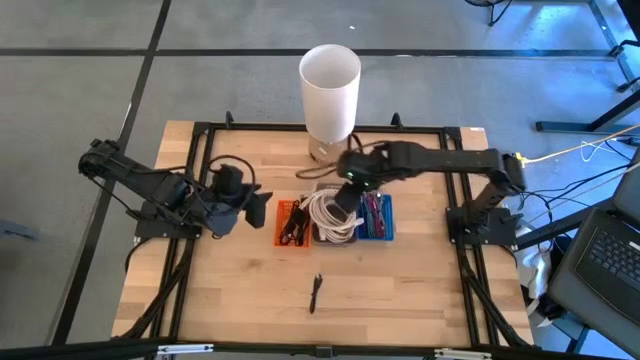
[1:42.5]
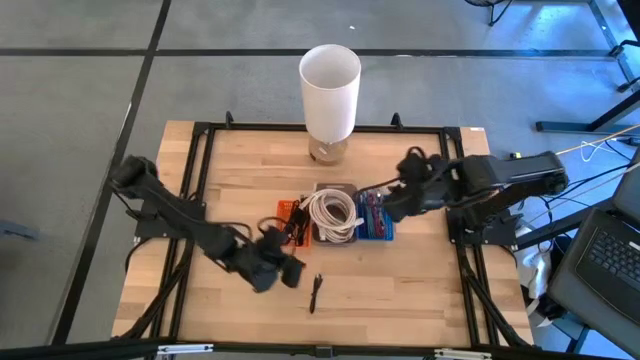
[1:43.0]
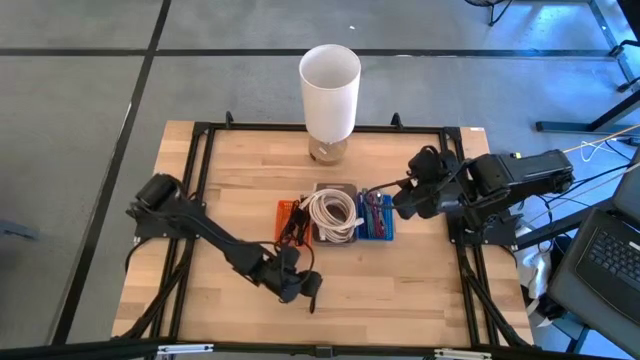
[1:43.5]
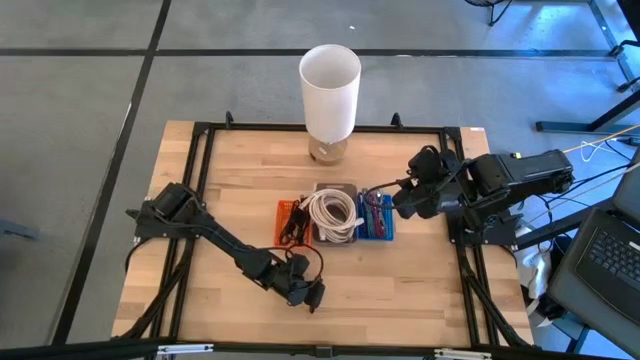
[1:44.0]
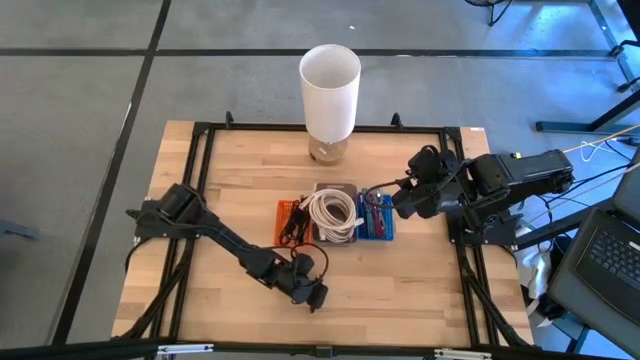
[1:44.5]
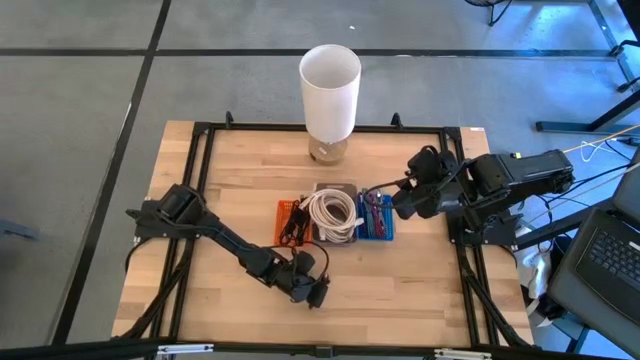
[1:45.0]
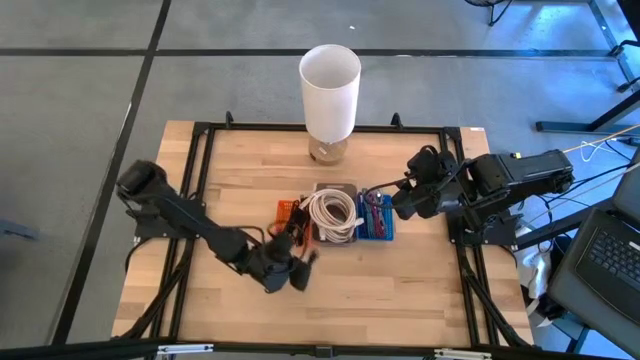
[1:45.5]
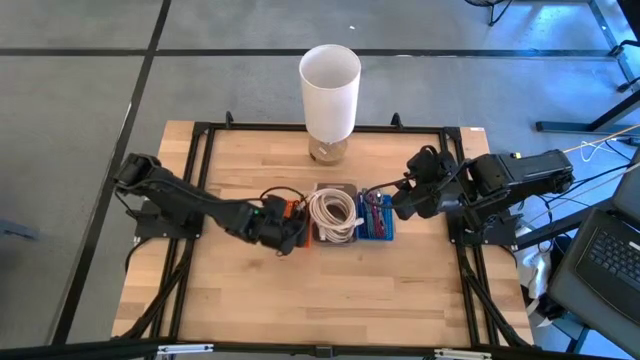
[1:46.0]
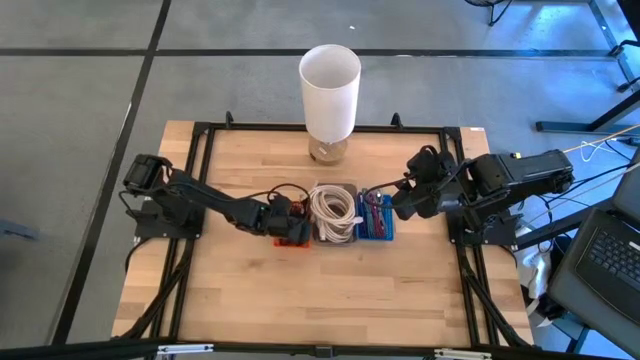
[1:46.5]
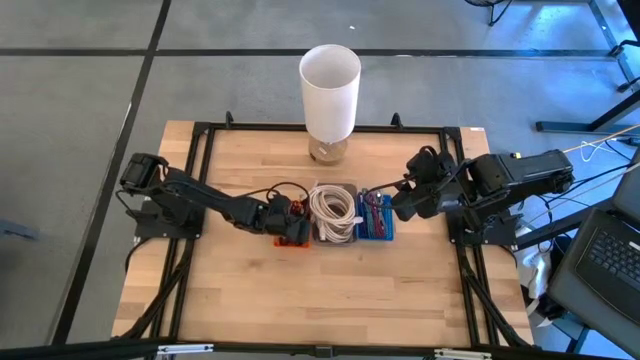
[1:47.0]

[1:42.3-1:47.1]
Task: Pick & Place USB Port
Put the black charger cable into the orange bin

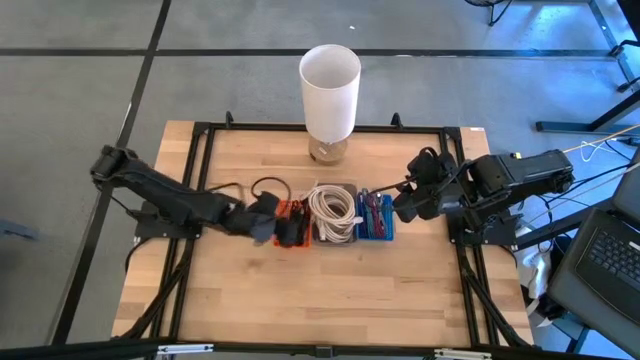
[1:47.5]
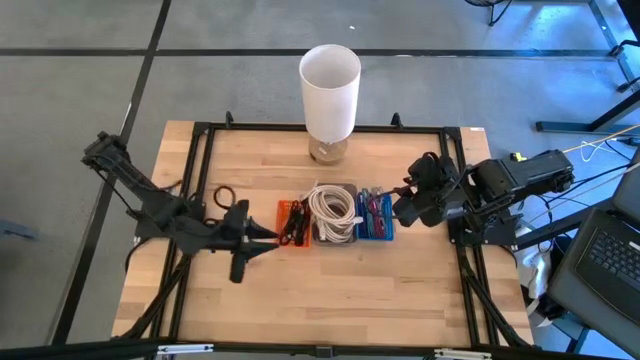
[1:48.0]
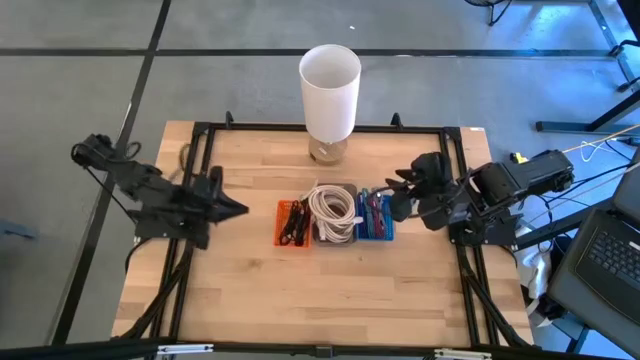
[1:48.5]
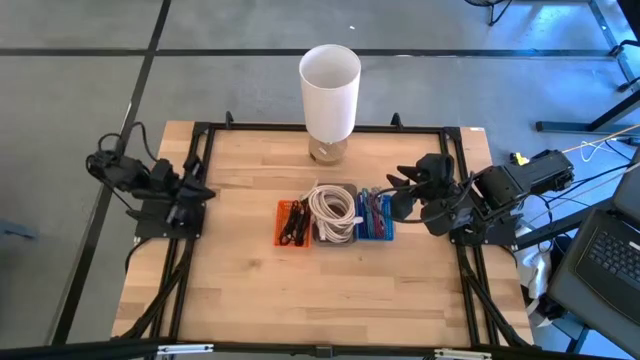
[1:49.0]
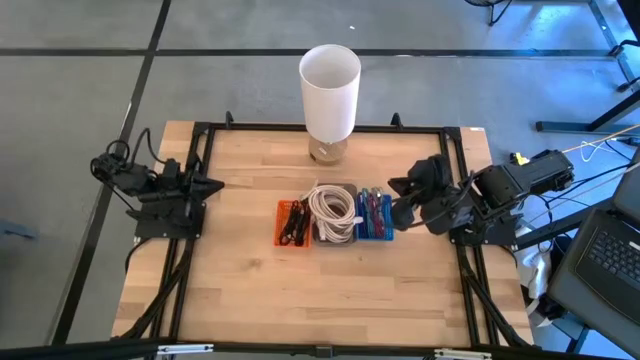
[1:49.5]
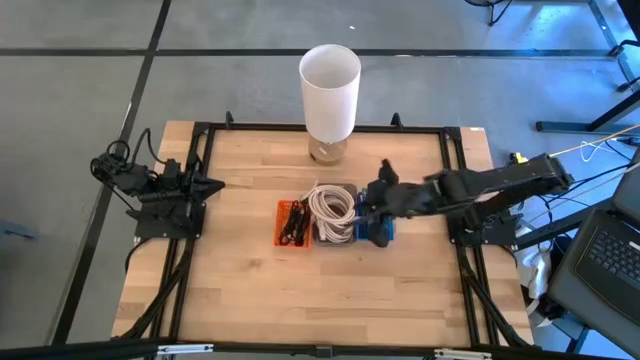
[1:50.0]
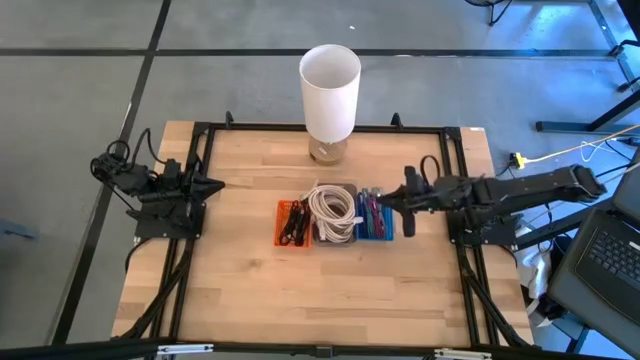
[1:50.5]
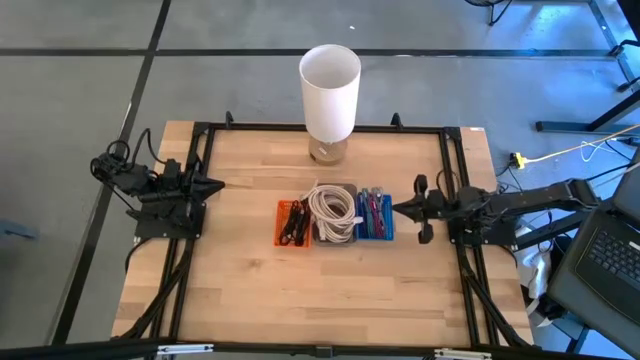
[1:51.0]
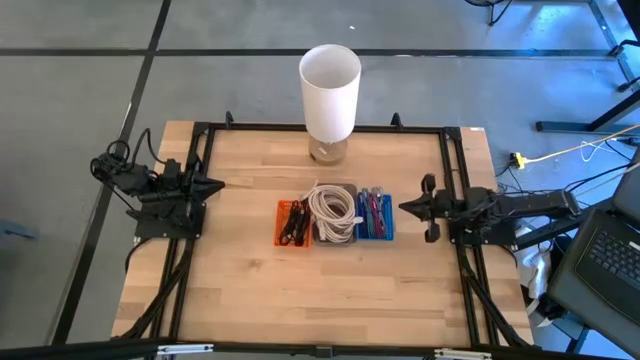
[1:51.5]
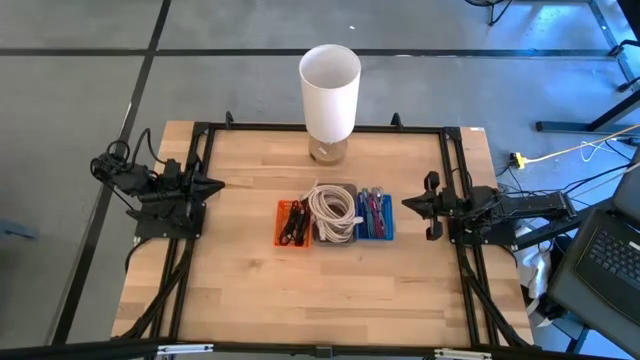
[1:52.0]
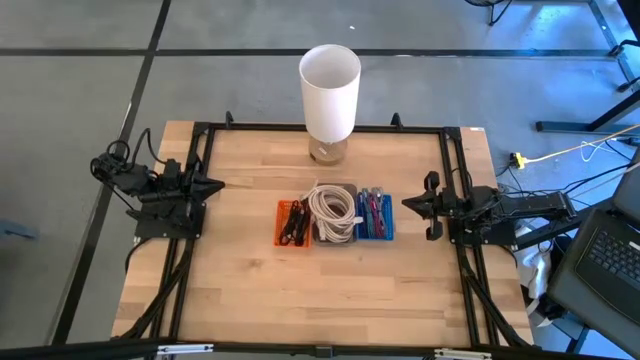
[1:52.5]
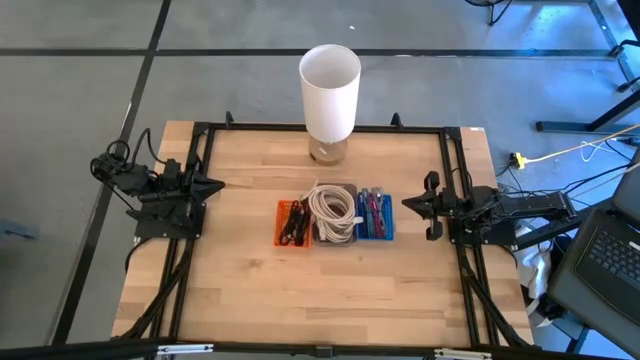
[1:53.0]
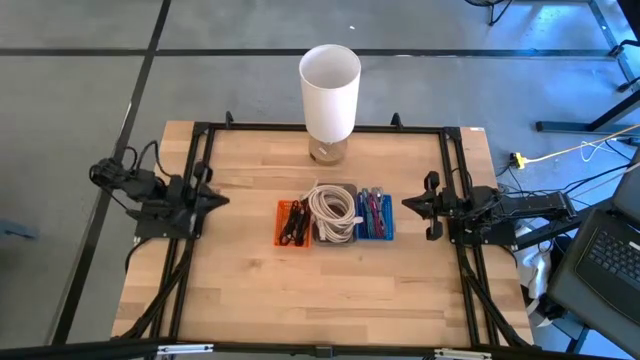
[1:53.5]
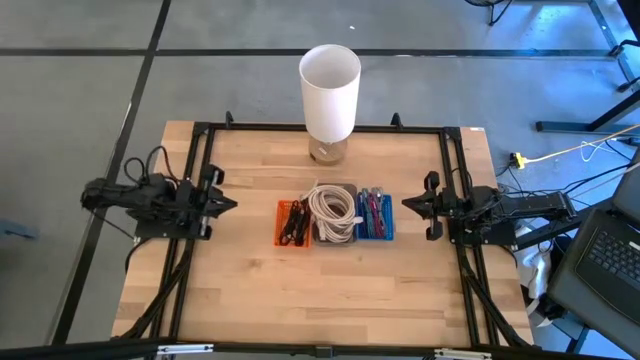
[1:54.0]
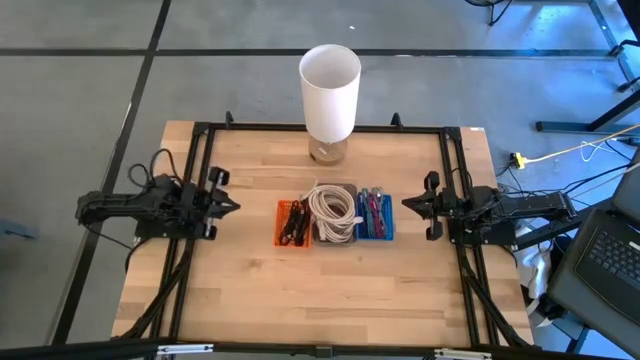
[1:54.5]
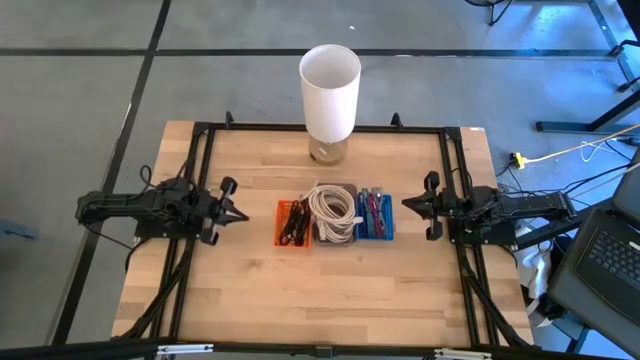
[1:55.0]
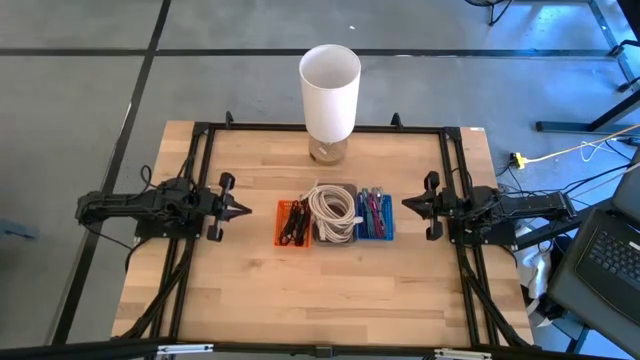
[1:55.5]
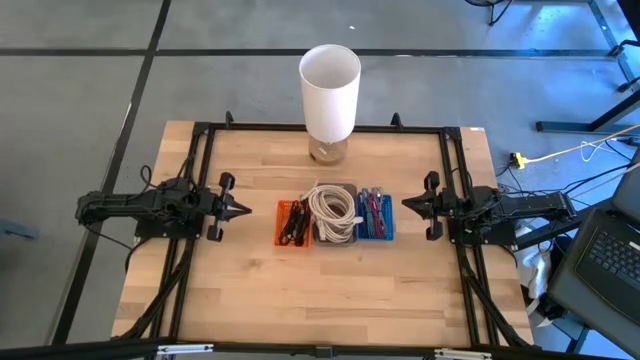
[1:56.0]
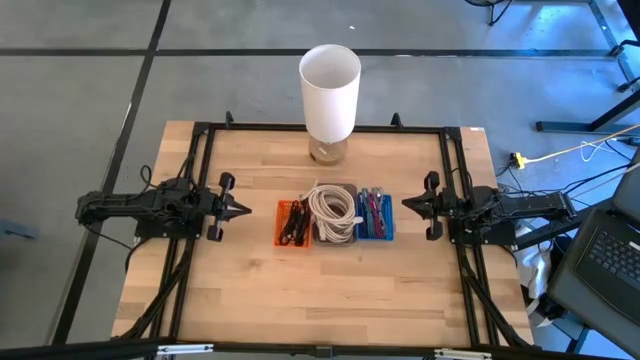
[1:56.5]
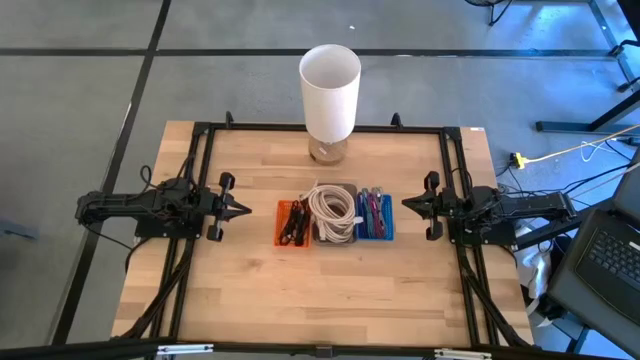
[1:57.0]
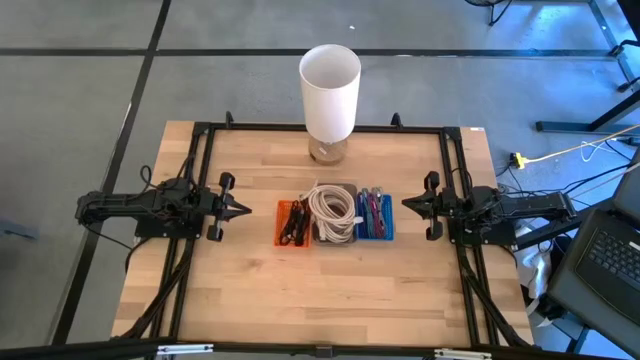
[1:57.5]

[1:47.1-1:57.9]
Return to Home Position

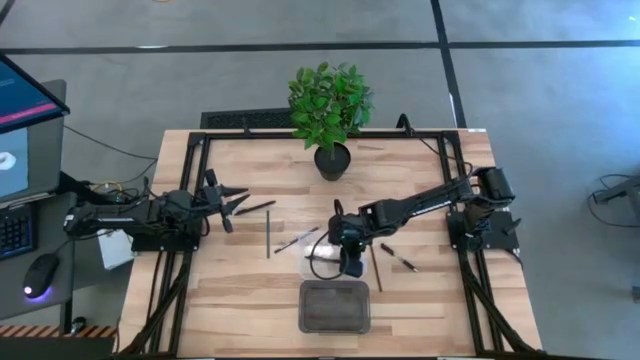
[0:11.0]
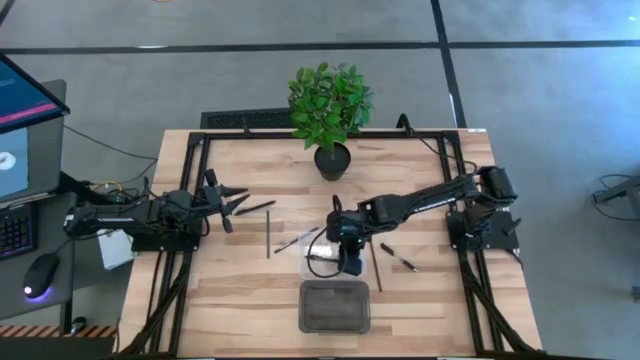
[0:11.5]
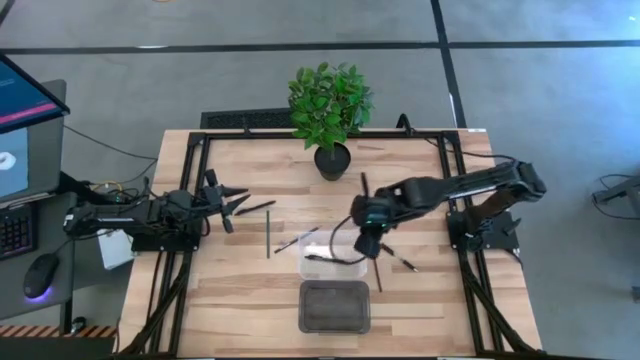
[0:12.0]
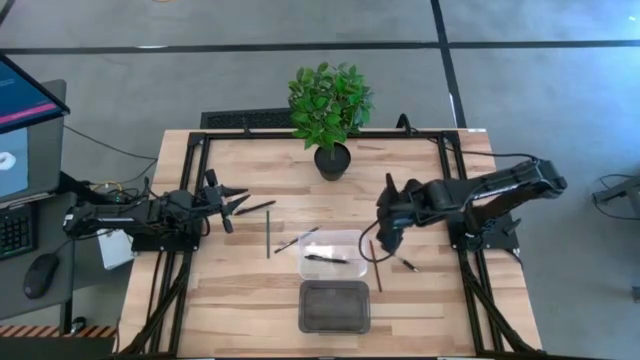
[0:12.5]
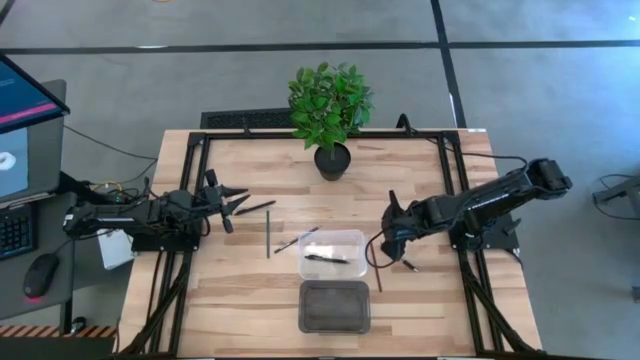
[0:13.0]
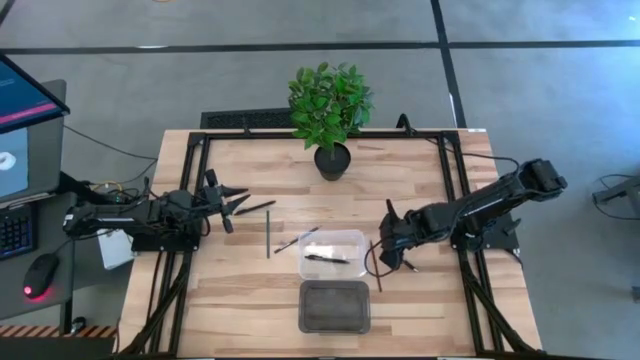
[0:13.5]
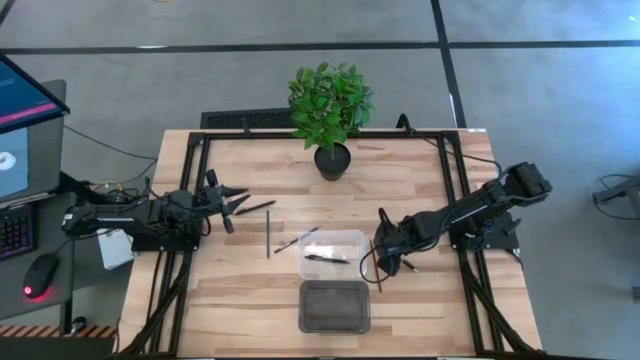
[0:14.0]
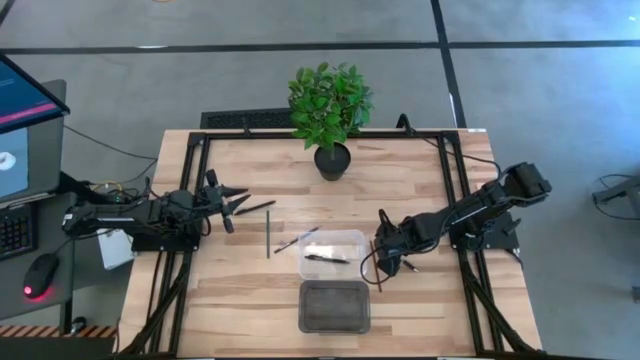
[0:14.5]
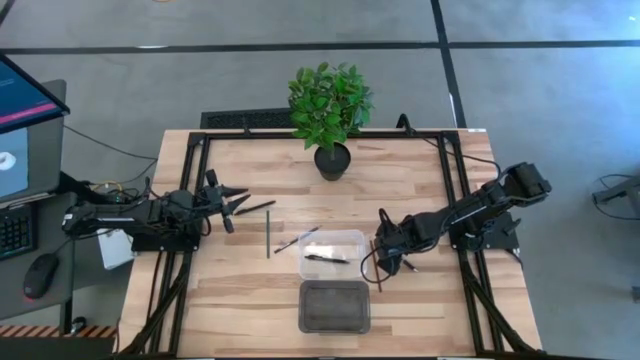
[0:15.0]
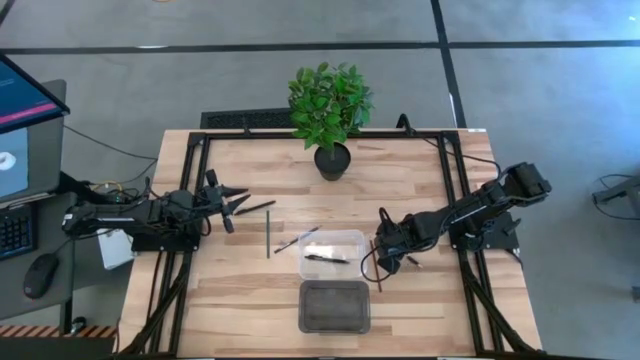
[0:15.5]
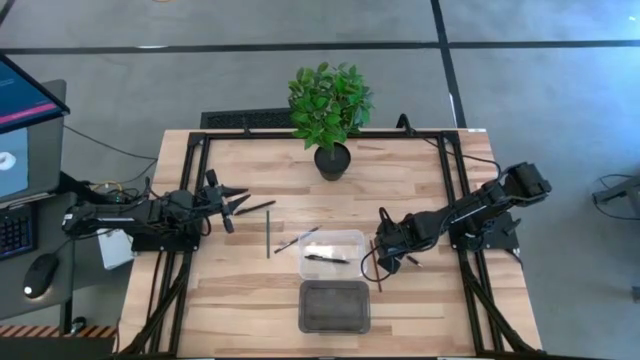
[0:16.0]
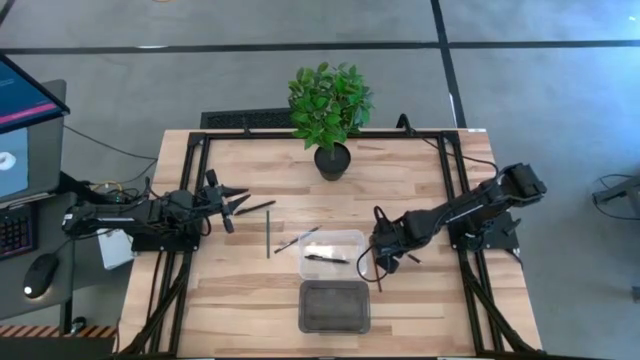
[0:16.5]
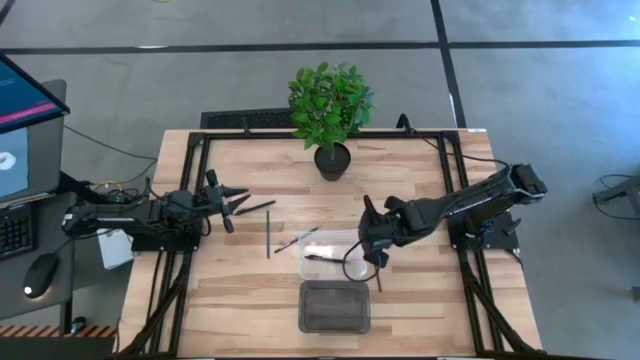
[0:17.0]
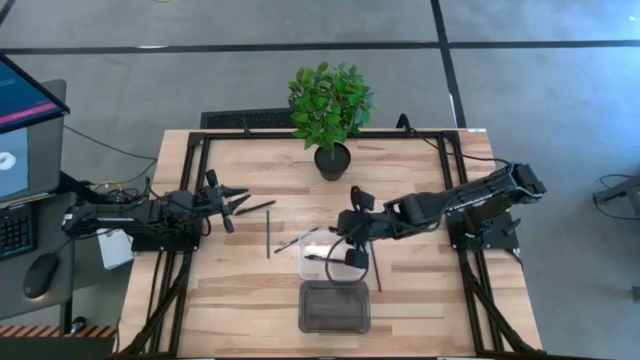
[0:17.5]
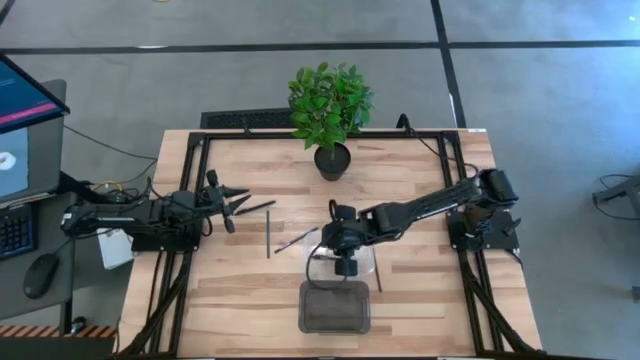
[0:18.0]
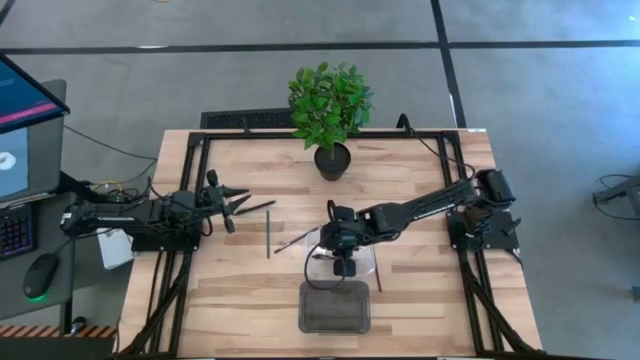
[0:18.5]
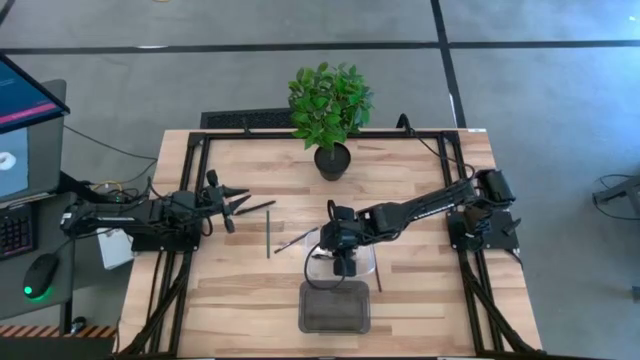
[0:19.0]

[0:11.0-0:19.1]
Task: Sort pens & pencils
Put the bottom black ballpen into the transparent bin
